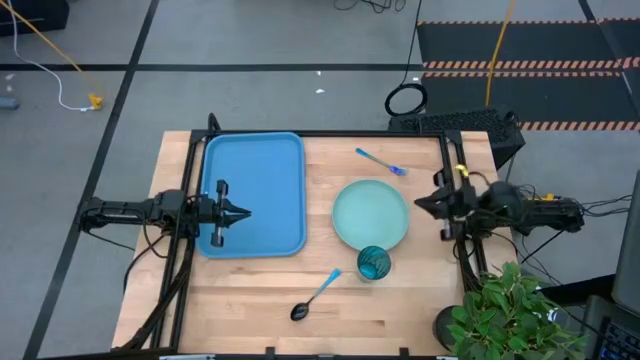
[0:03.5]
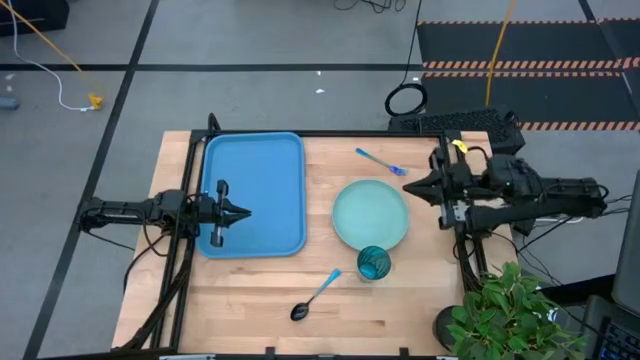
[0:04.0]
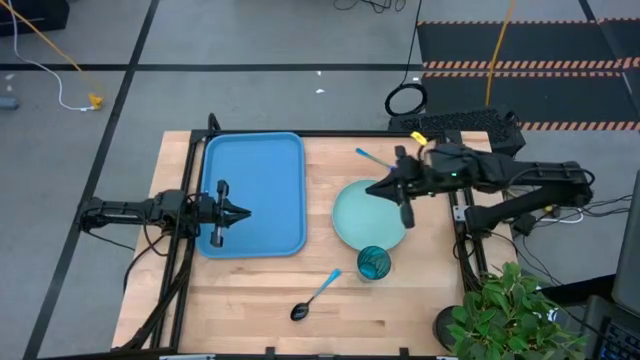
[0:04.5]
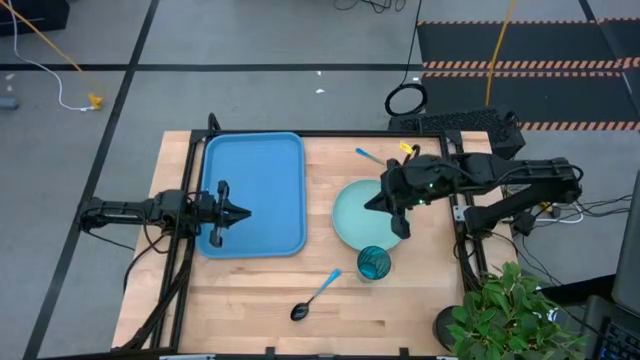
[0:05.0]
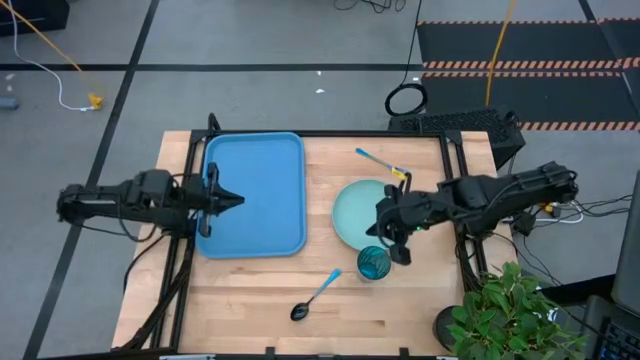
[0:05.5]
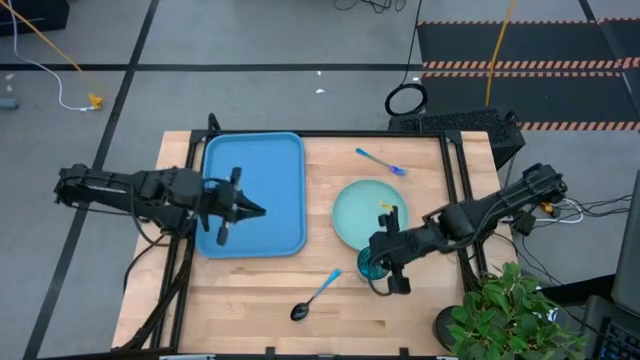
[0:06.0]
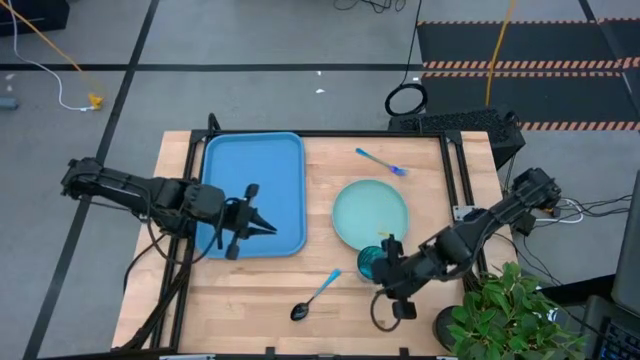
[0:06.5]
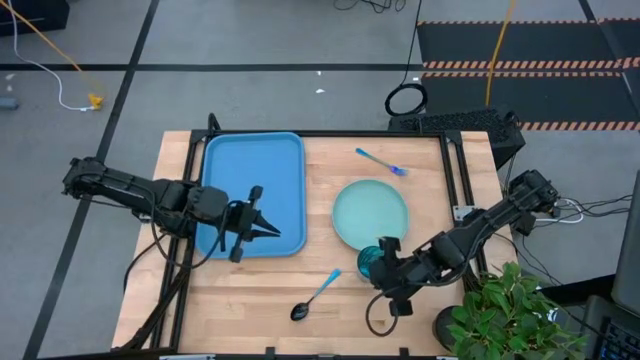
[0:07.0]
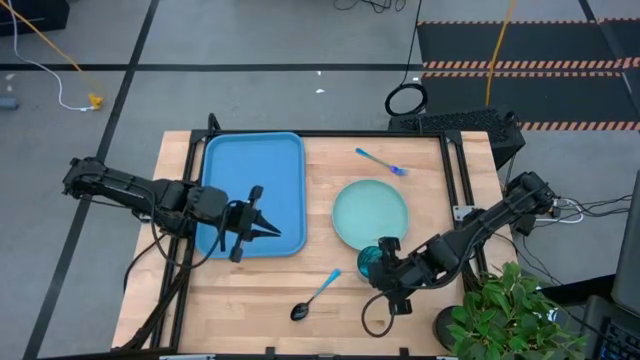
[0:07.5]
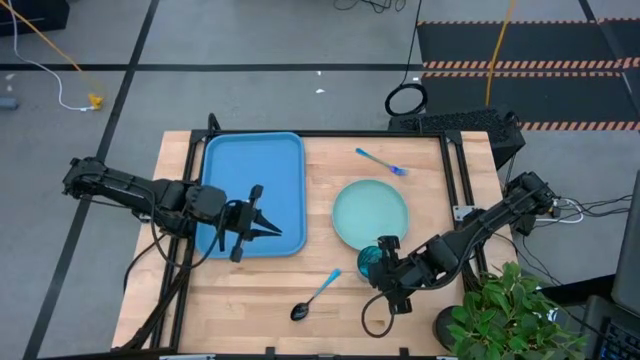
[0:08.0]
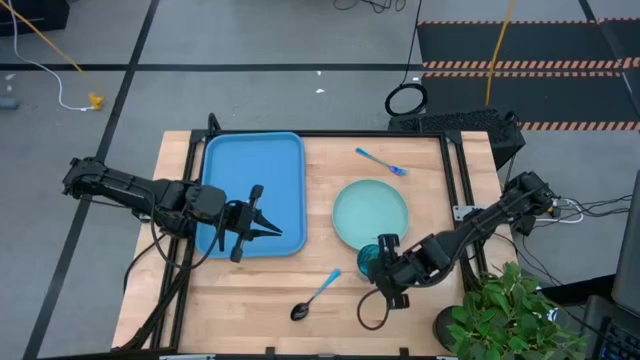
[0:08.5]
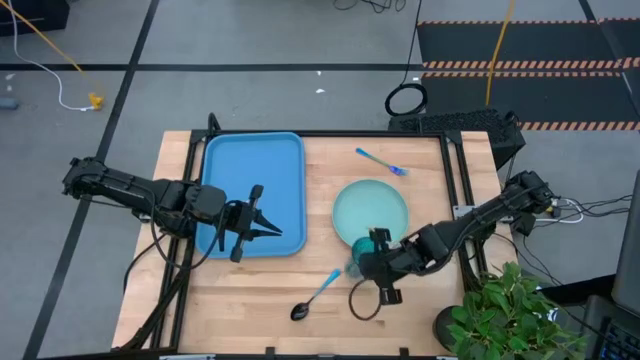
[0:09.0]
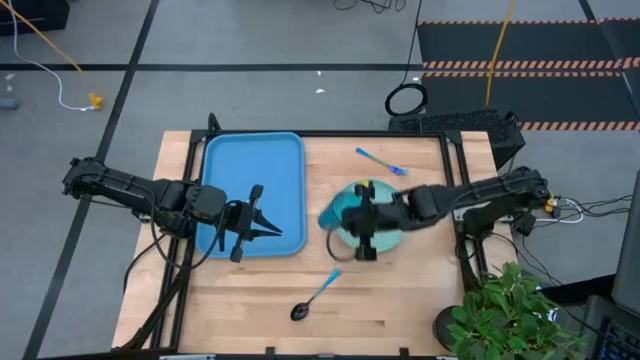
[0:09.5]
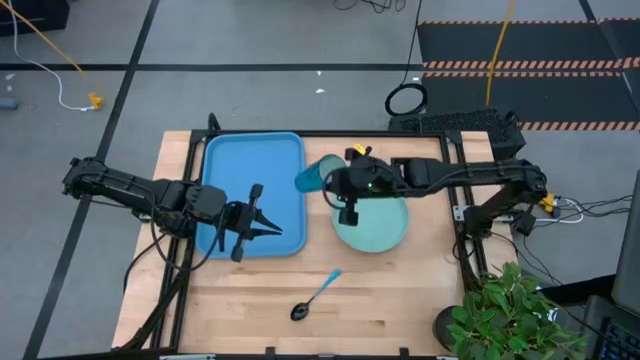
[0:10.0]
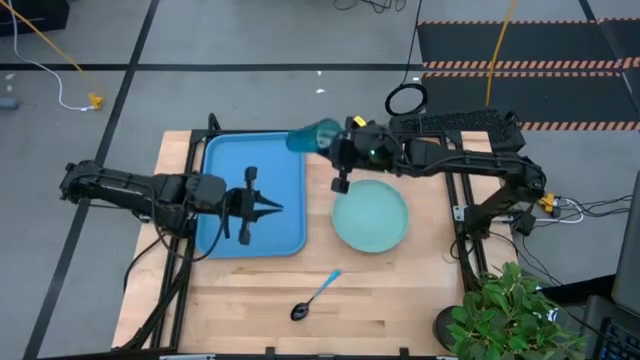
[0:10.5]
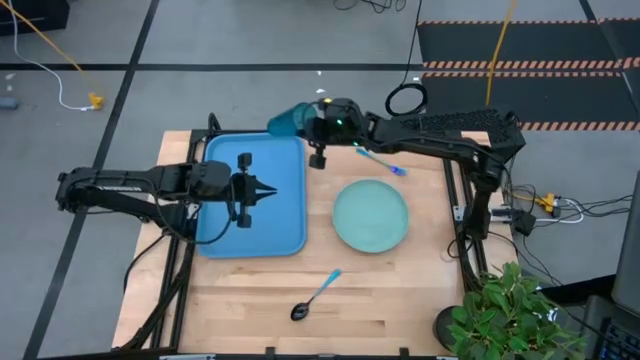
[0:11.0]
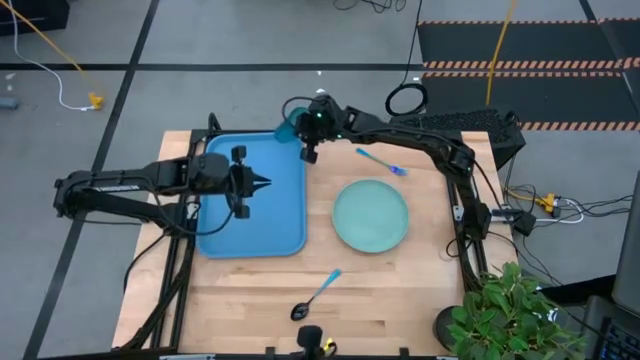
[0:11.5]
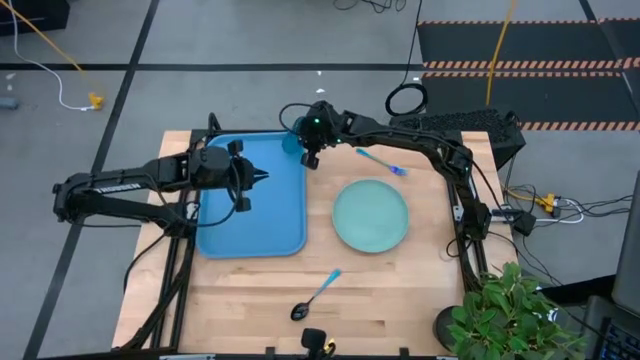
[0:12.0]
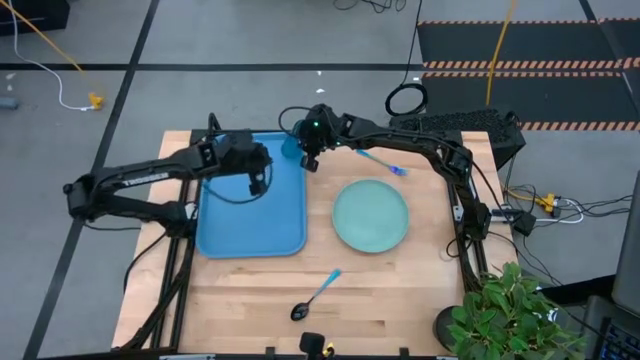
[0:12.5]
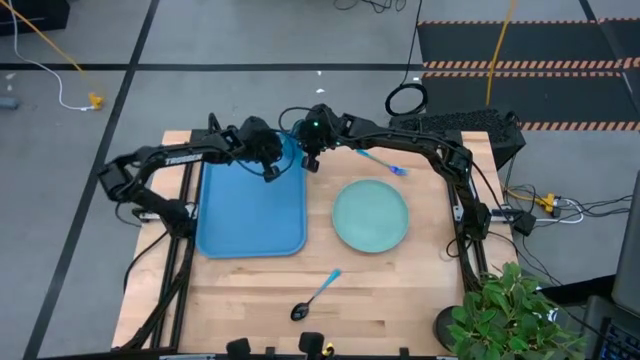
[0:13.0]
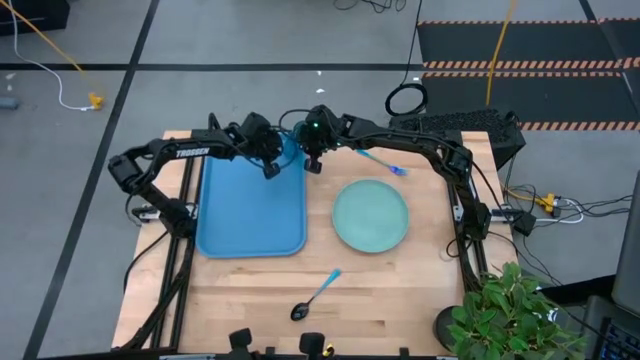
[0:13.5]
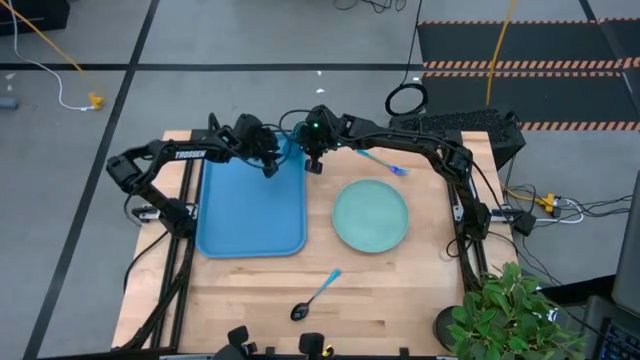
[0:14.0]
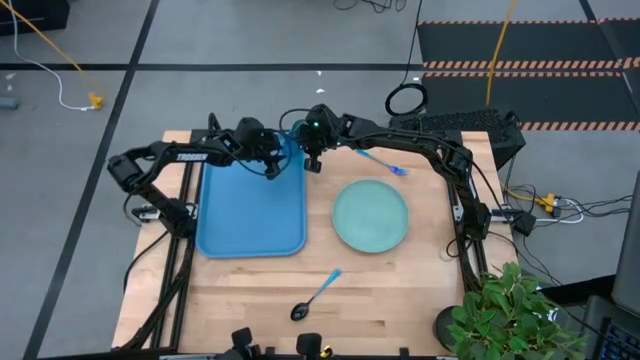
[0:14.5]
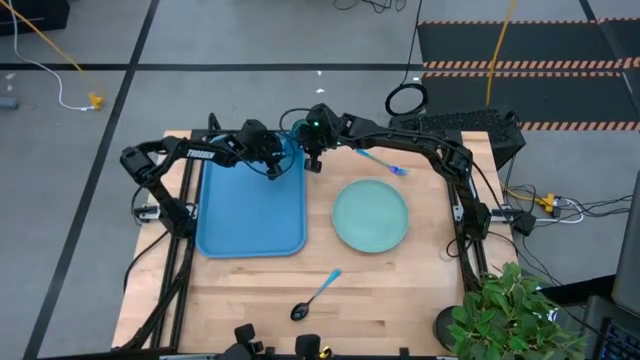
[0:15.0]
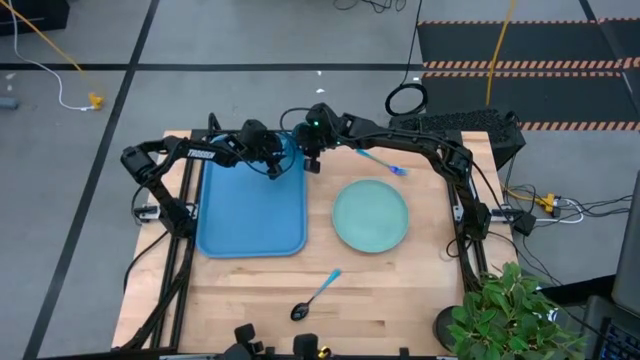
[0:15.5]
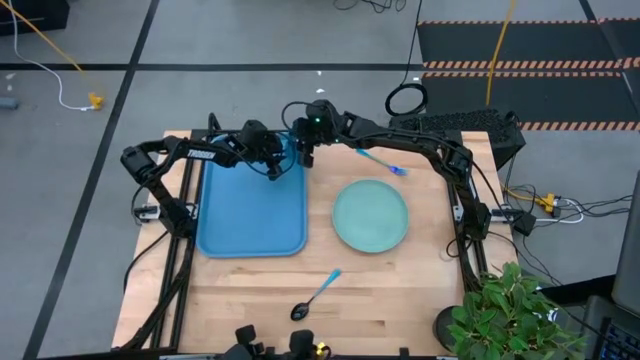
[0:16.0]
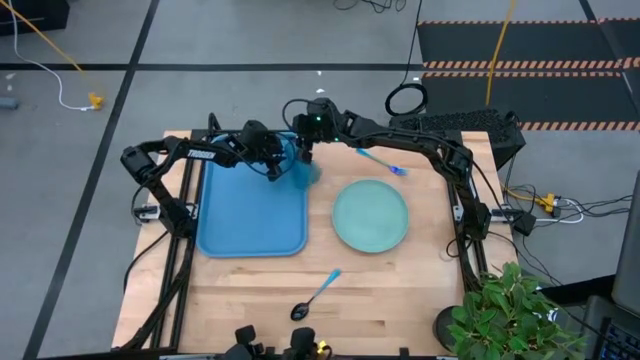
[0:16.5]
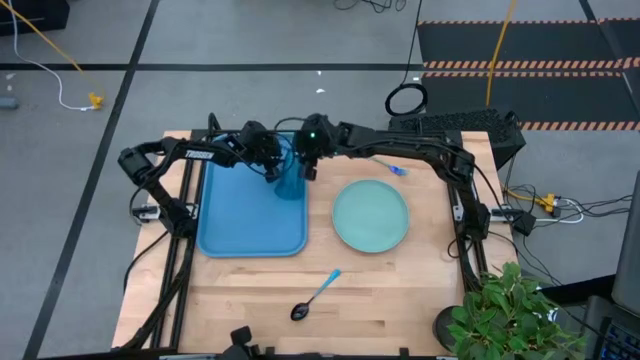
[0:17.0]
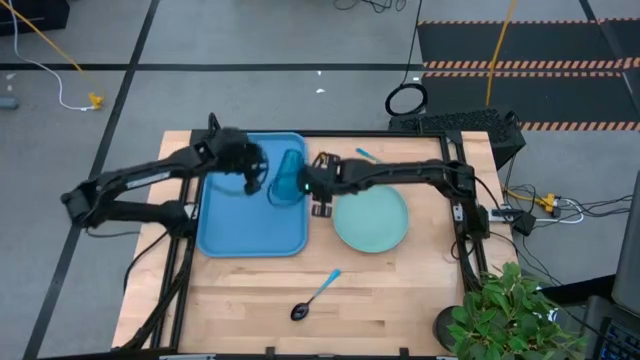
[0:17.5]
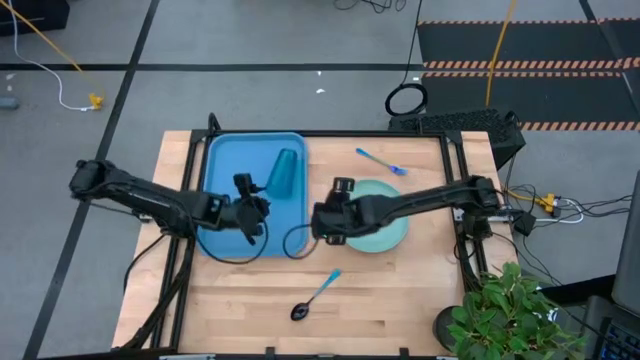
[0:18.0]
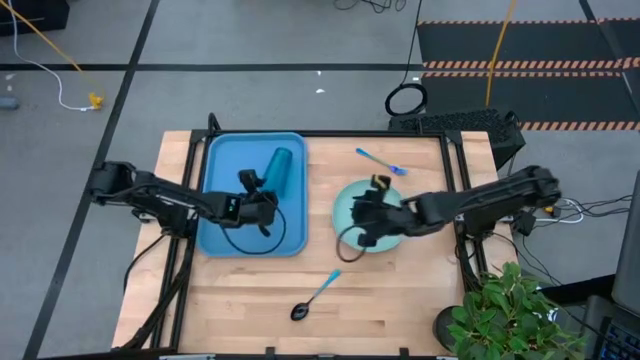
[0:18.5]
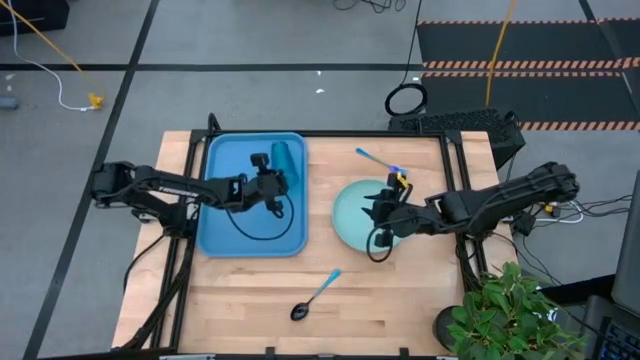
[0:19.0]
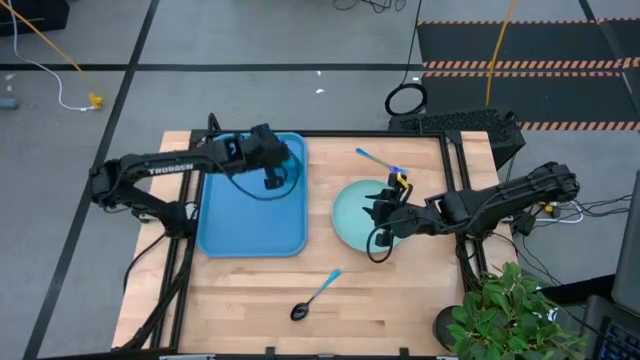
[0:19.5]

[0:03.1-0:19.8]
Task: Pick and place plate/cup/fork/spoon on tray
Put the blue glass on the top right of the blue tray

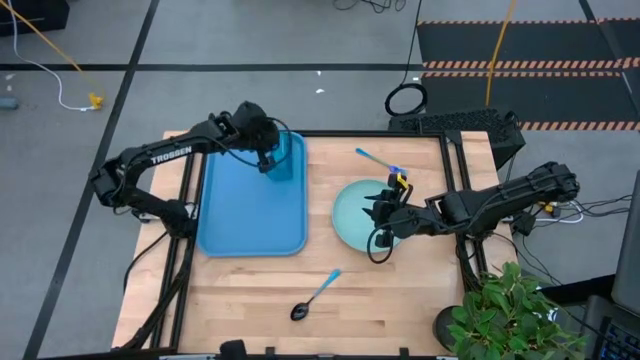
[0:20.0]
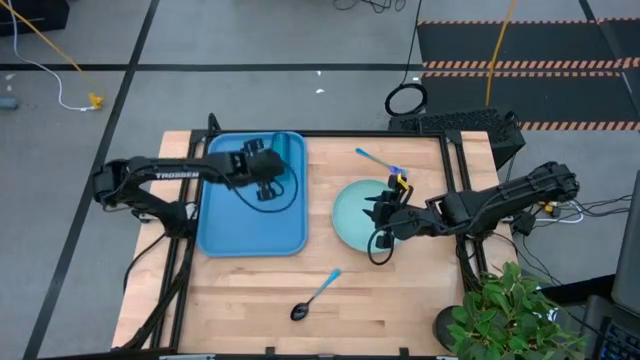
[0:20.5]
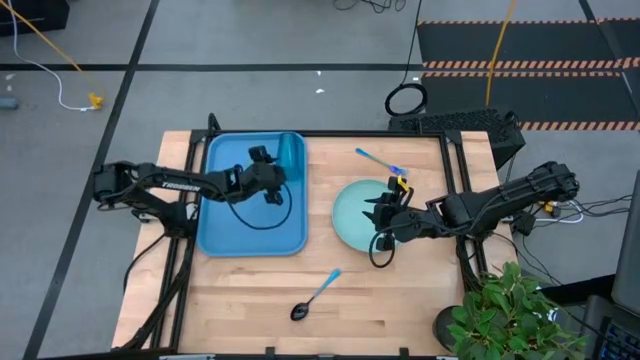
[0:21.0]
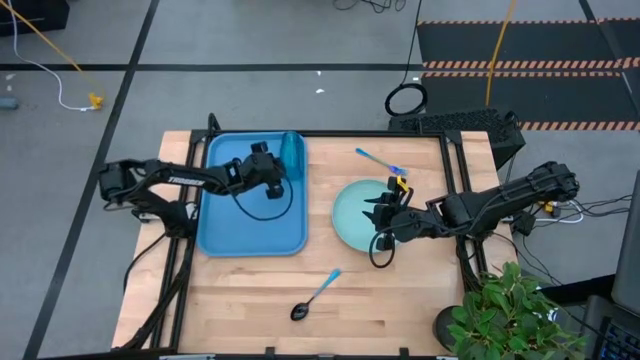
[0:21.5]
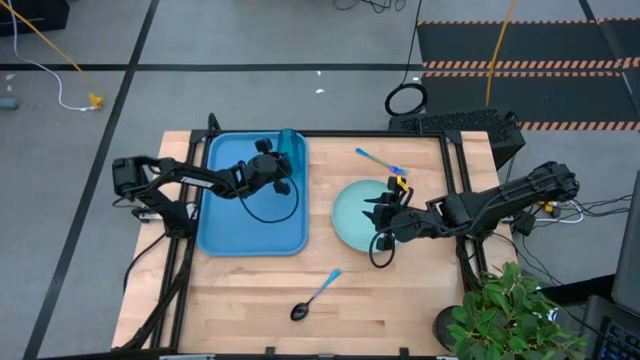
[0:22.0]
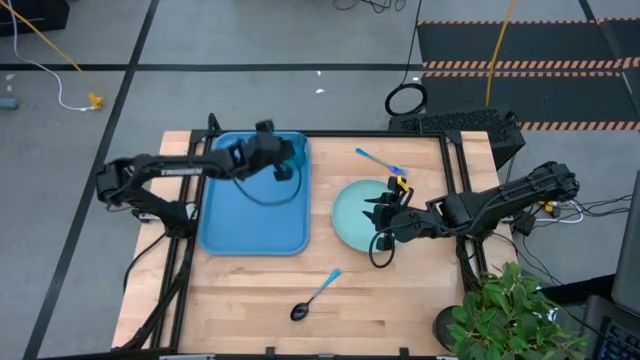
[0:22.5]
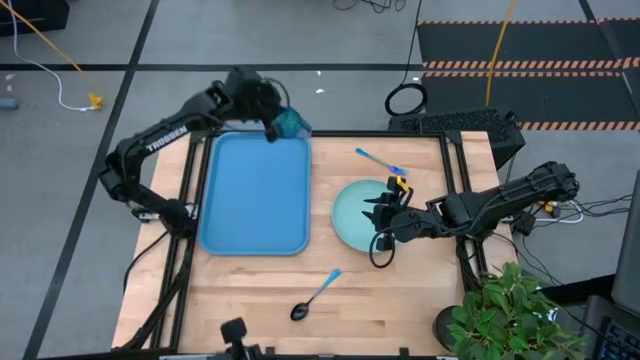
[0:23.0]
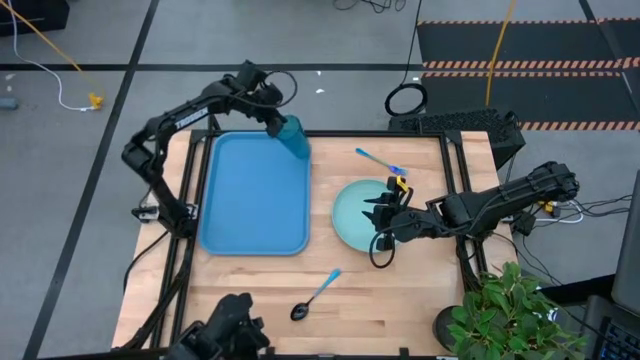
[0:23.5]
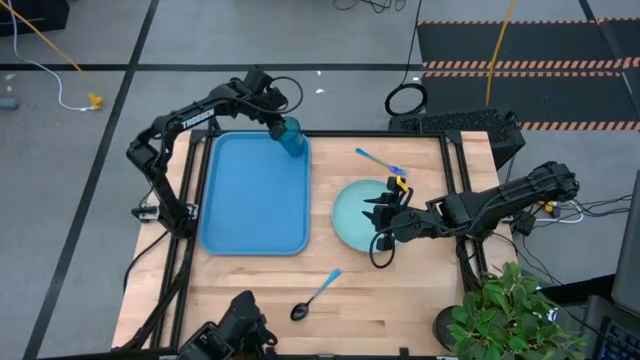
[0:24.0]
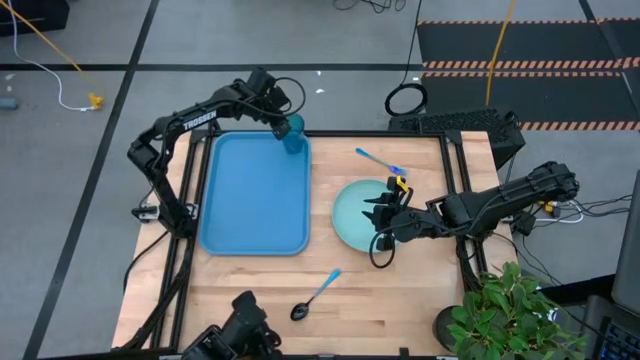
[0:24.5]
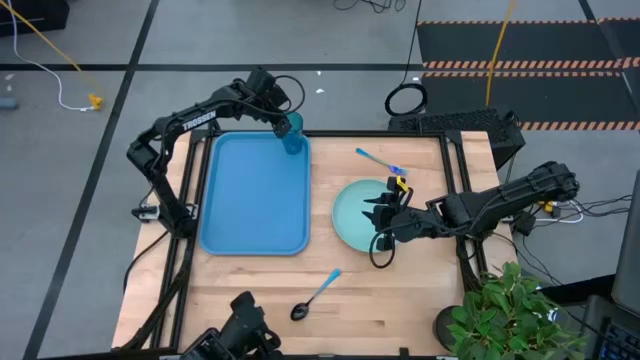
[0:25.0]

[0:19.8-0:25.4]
Put the blue glass on the top right of the blue tray

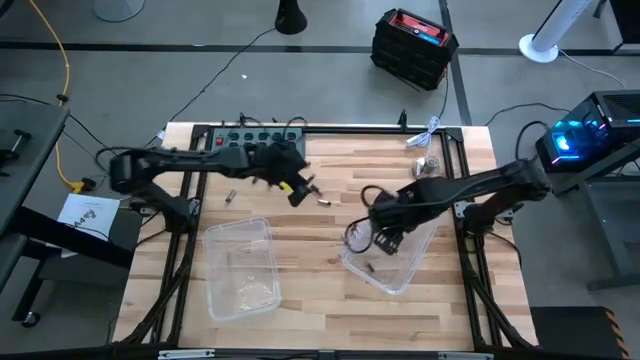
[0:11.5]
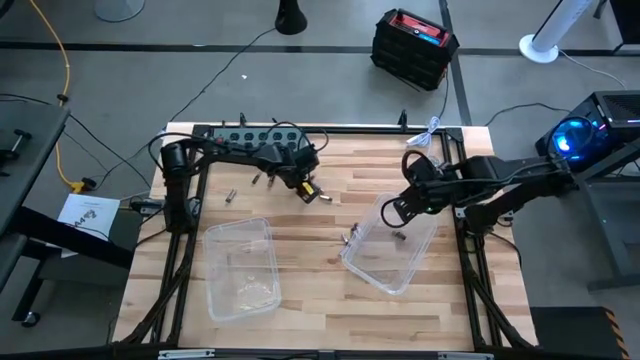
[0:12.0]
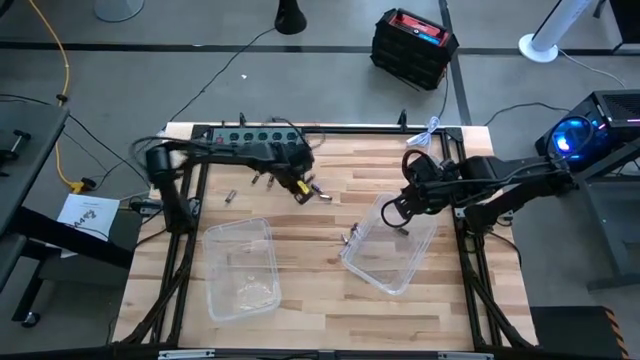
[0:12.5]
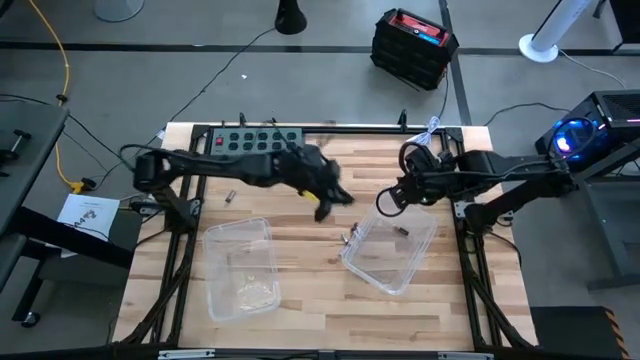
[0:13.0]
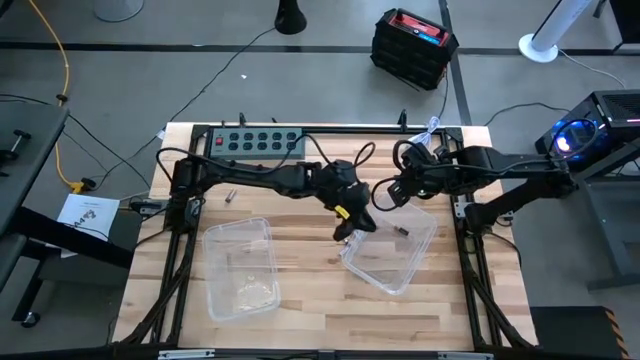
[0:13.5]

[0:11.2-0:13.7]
Task: Sort batteries
Put the black battery into the right transparent bin
